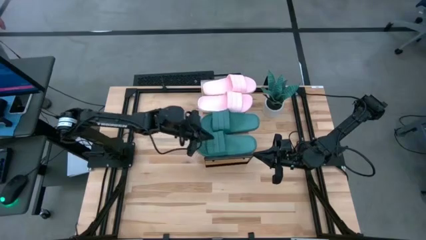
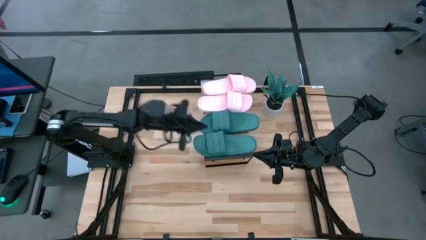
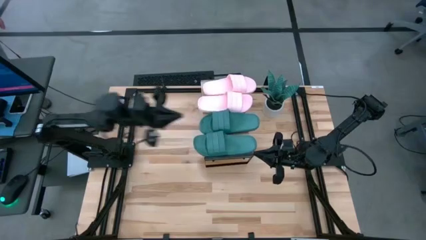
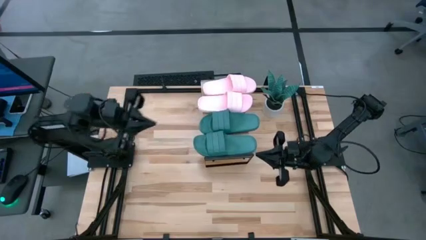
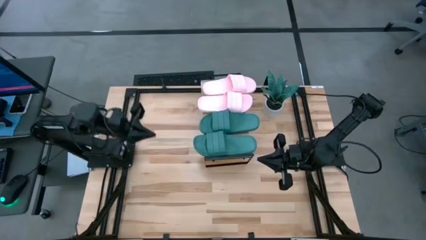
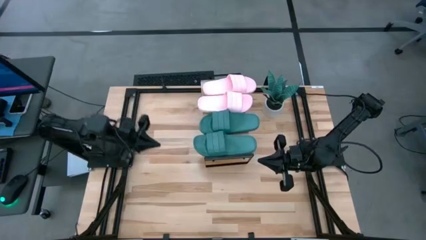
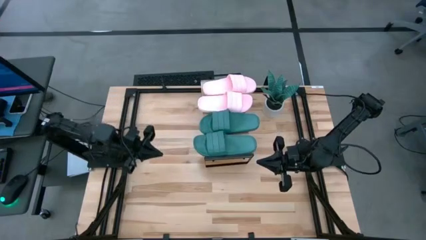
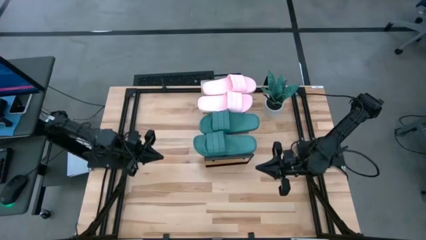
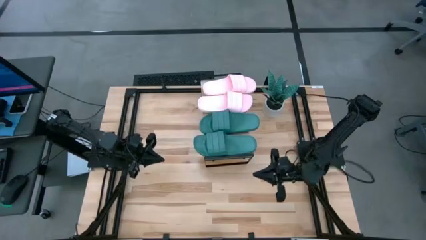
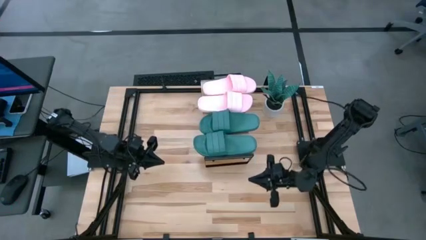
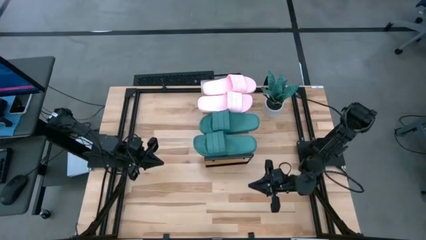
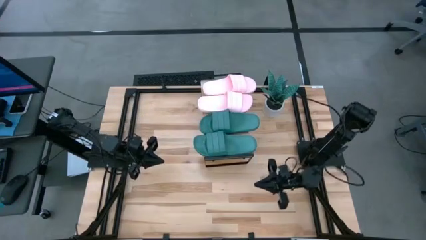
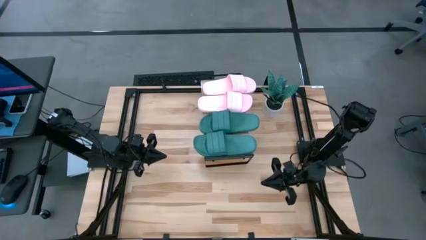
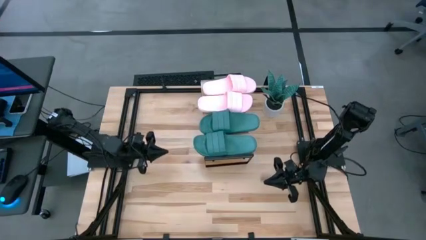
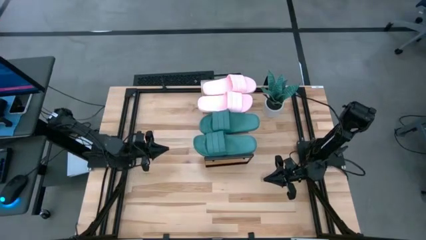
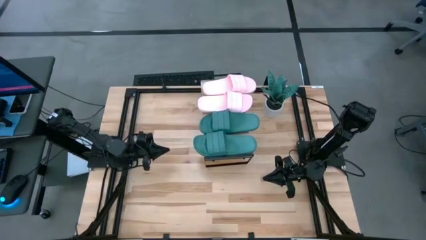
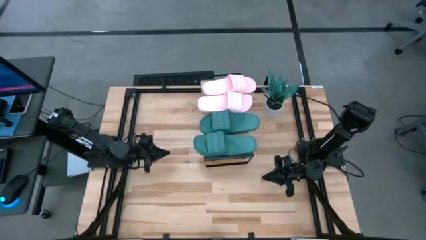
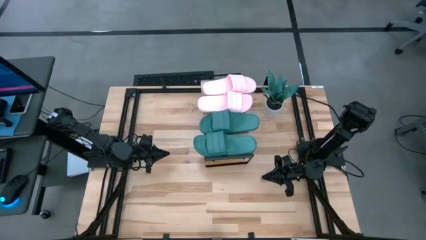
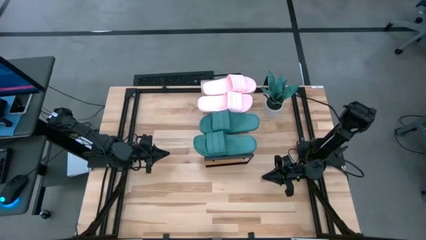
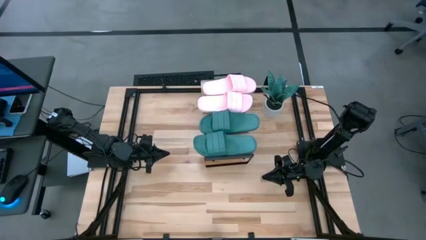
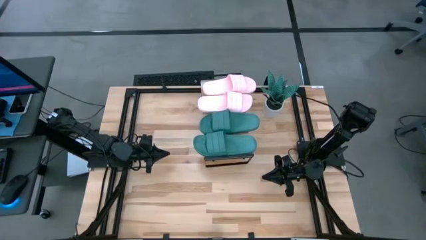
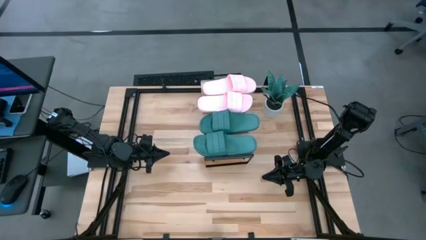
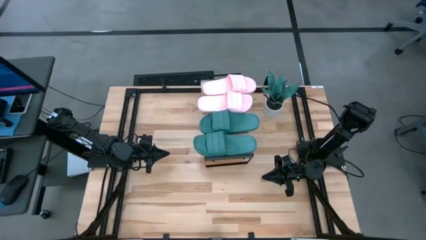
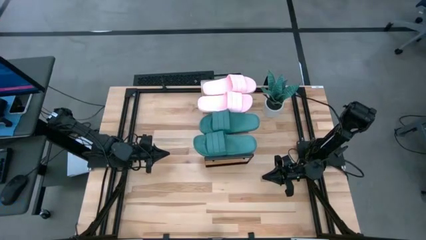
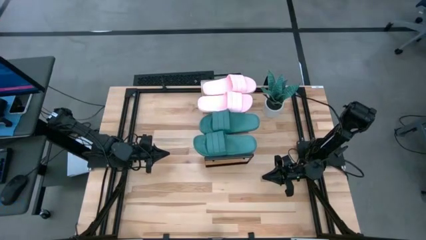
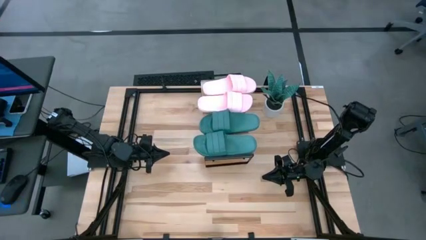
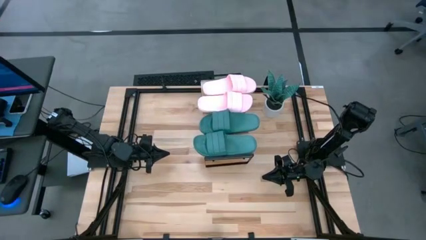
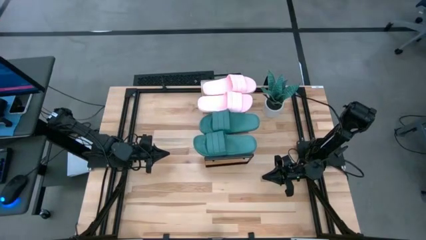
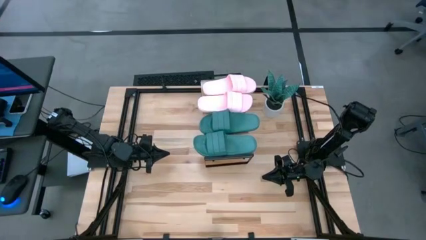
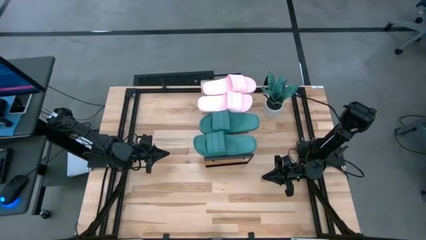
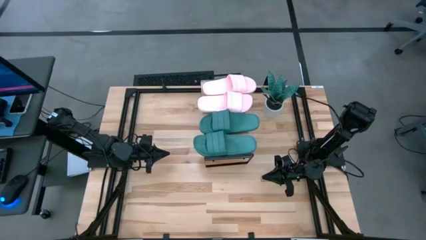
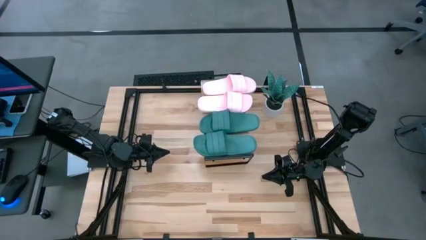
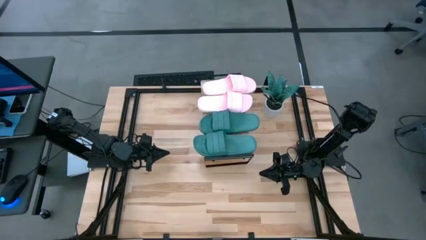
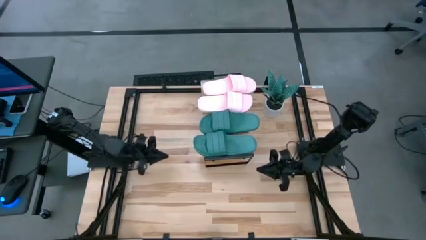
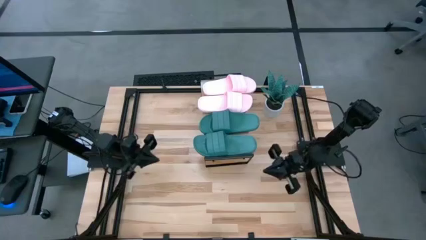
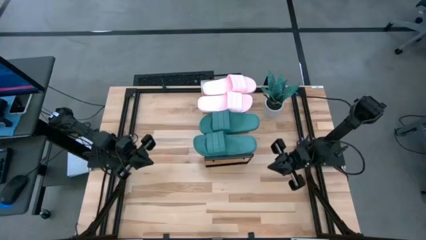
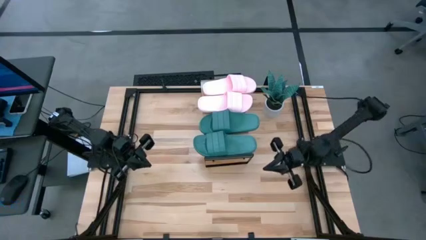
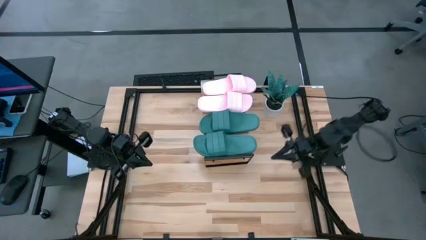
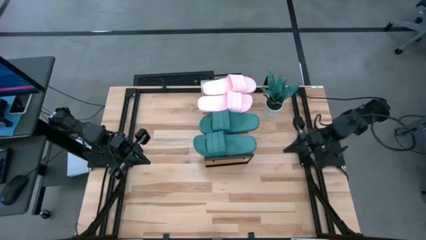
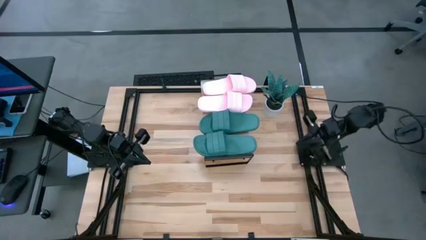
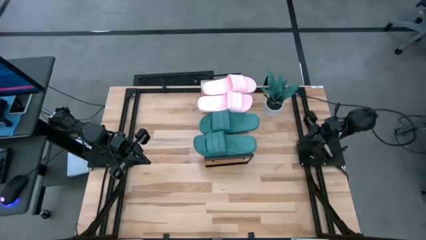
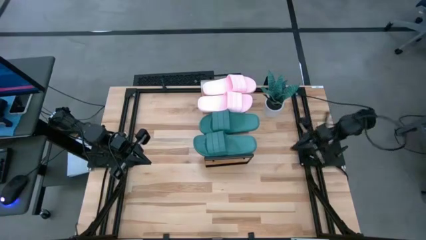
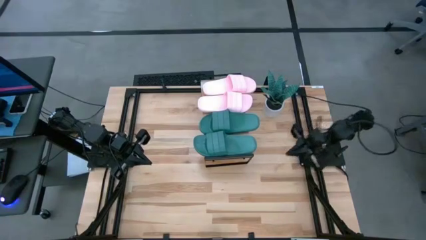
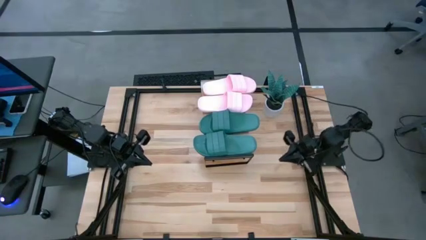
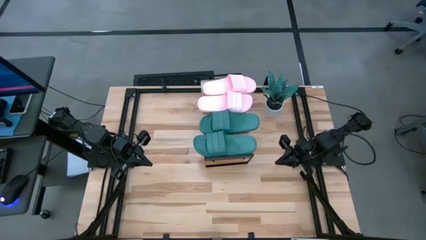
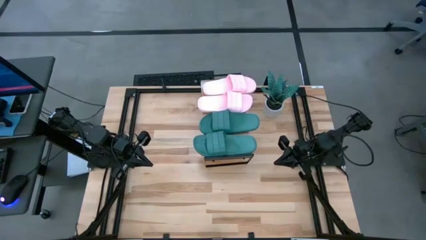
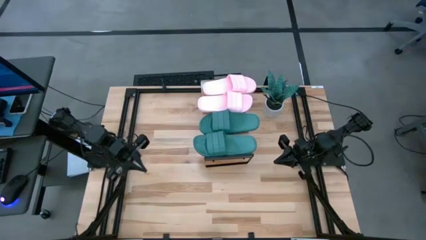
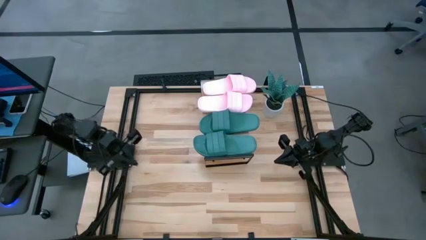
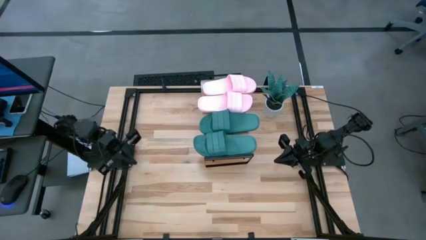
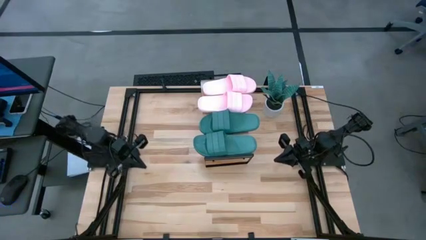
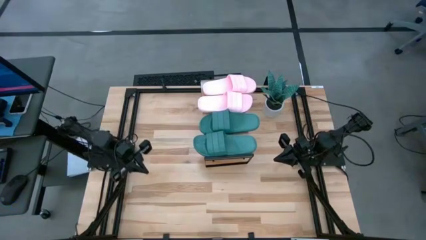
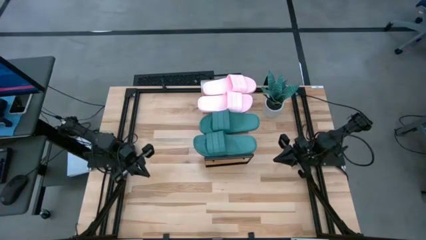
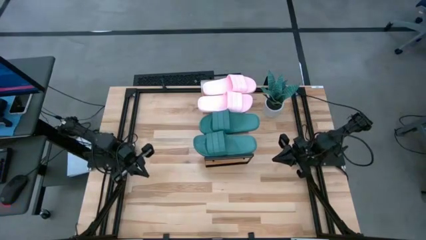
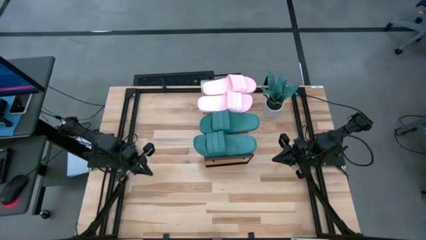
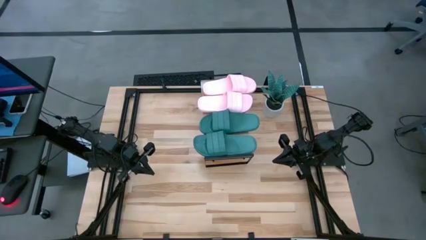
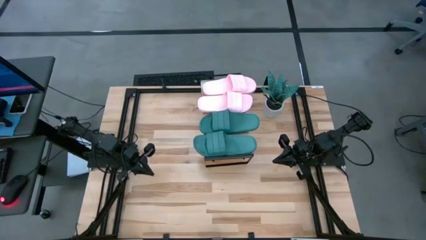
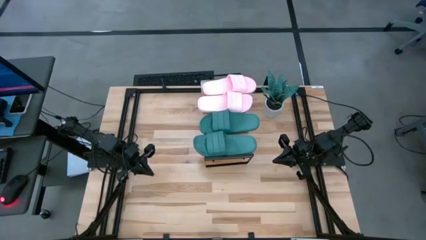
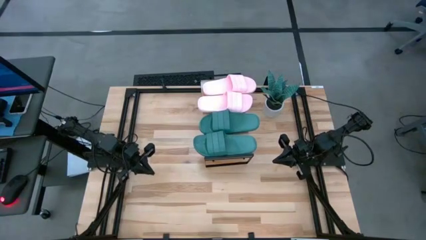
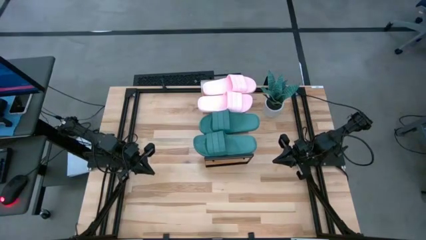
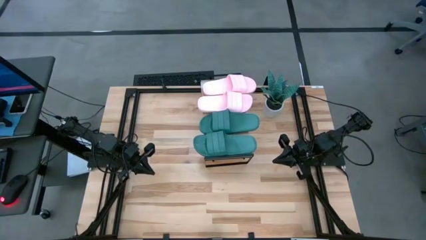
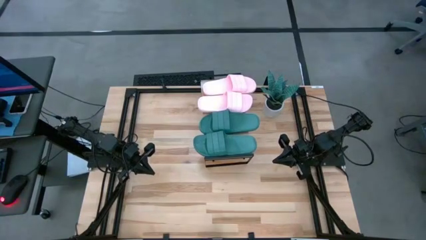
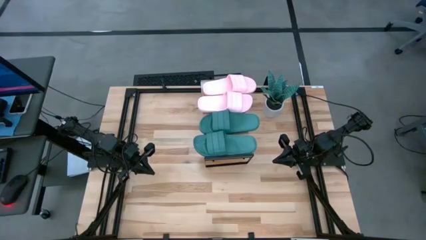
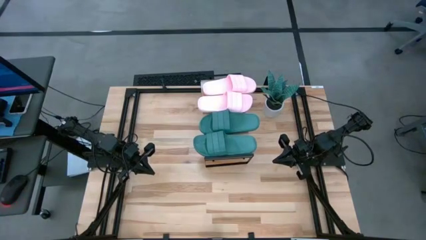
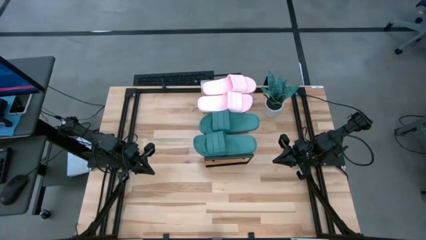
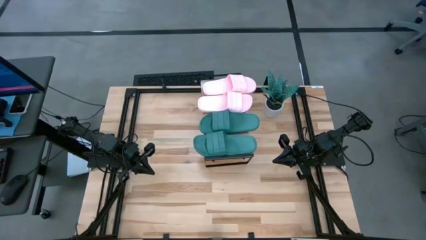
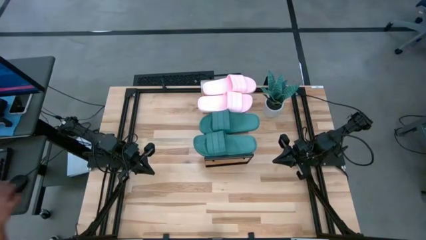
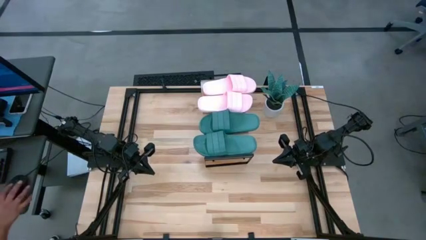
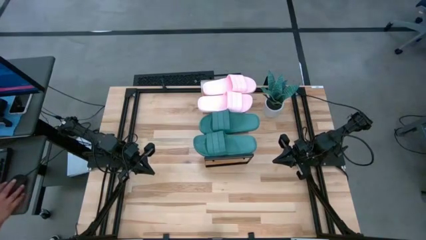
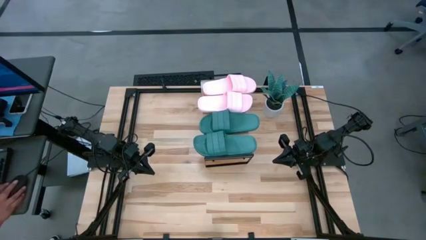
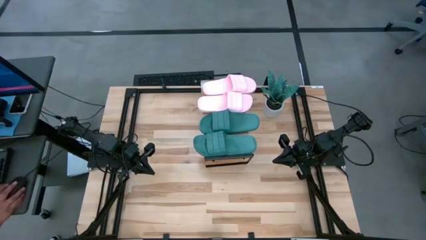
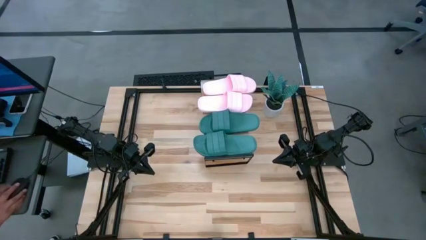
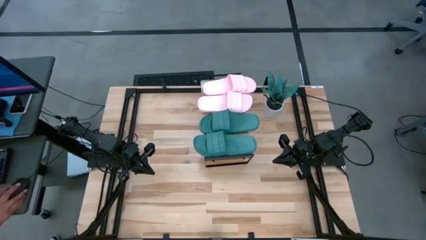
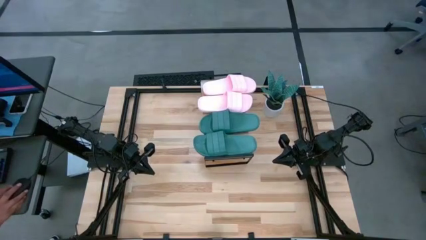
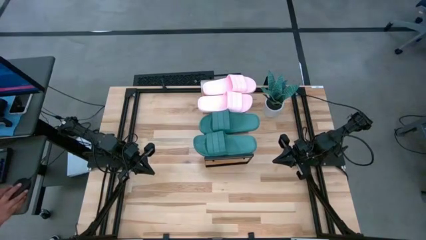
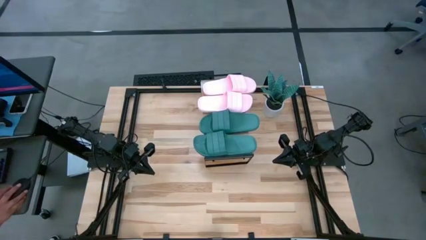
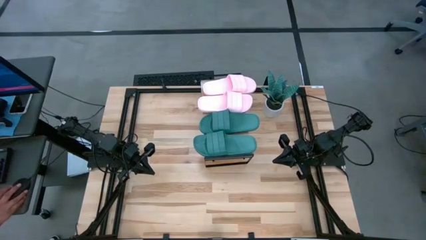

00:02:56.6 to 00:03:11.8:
Task: Pick and place slides into the shelf
Return to Home Position
